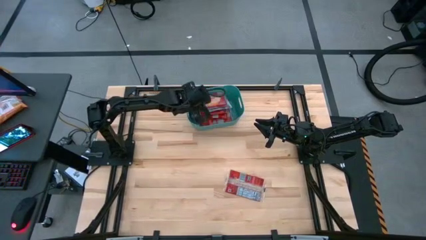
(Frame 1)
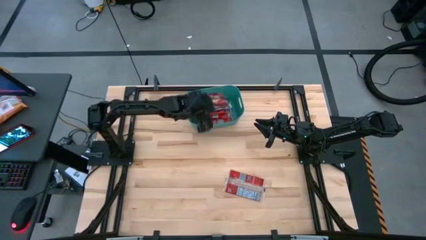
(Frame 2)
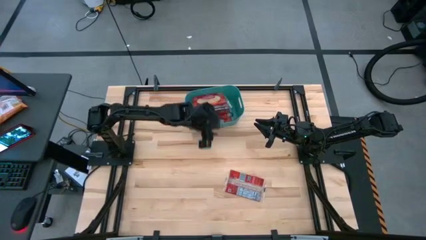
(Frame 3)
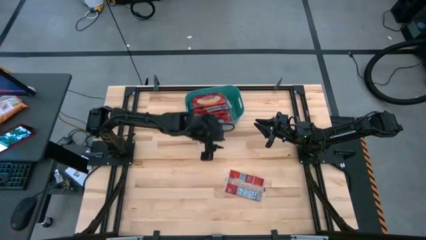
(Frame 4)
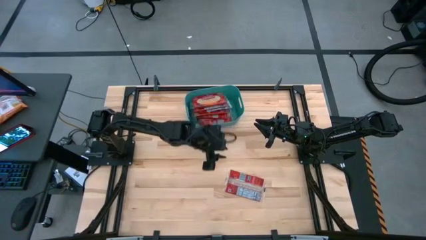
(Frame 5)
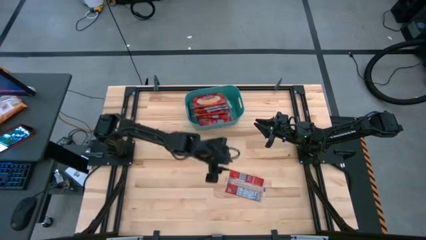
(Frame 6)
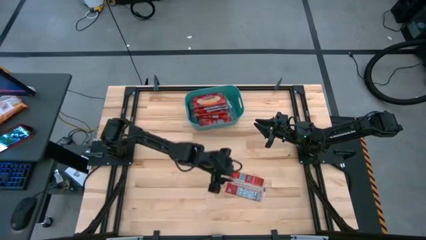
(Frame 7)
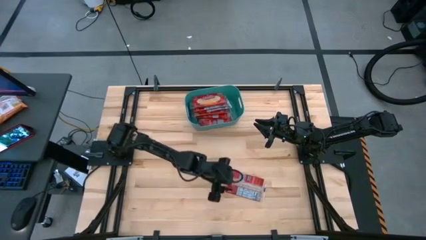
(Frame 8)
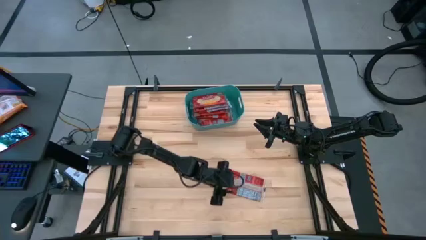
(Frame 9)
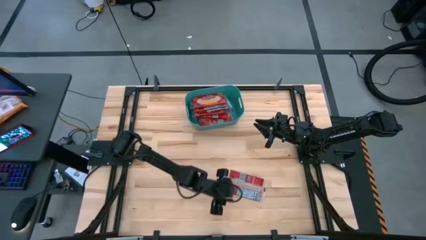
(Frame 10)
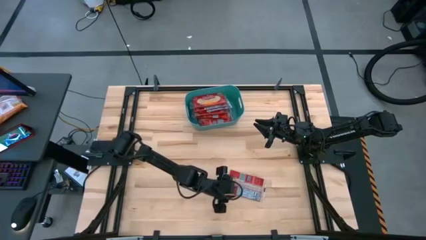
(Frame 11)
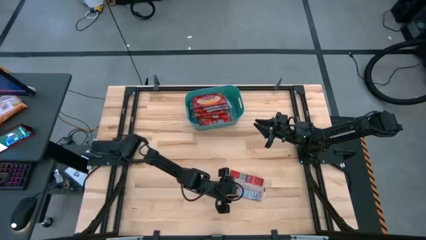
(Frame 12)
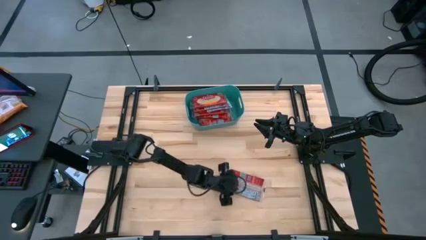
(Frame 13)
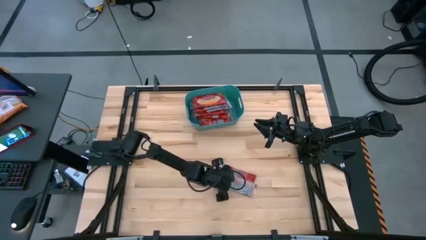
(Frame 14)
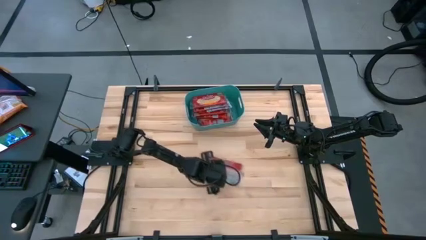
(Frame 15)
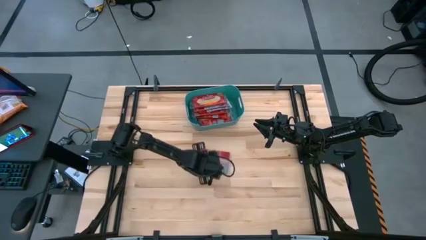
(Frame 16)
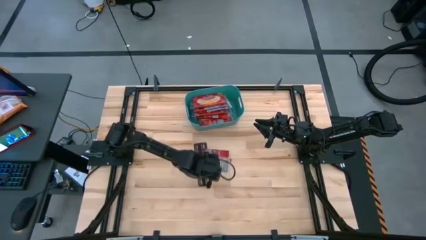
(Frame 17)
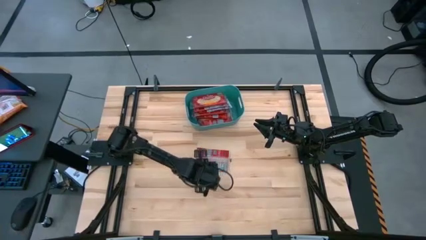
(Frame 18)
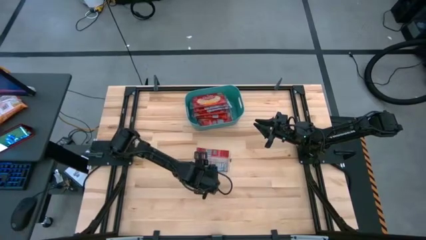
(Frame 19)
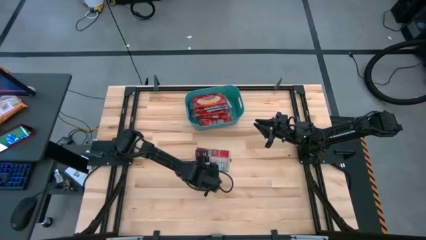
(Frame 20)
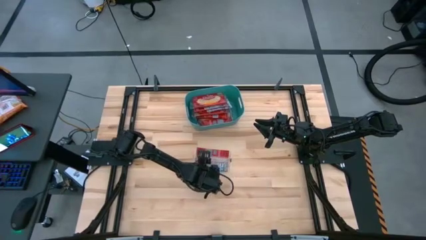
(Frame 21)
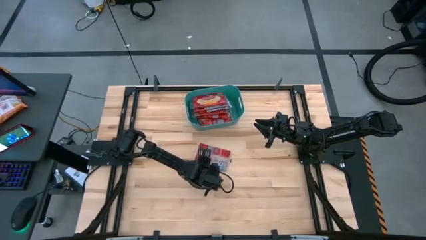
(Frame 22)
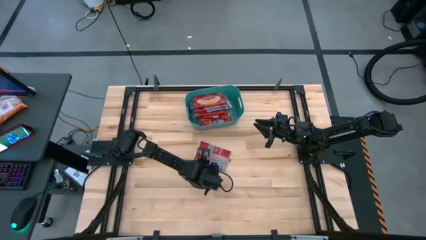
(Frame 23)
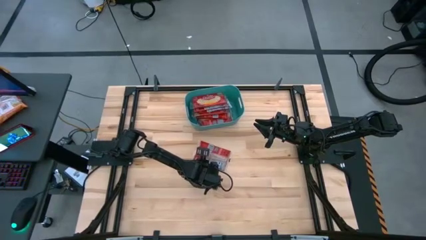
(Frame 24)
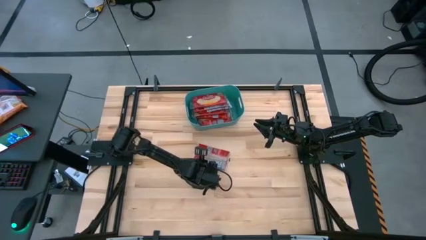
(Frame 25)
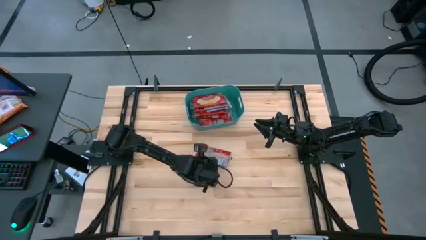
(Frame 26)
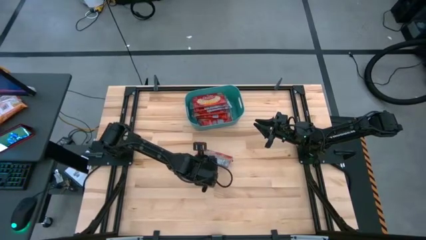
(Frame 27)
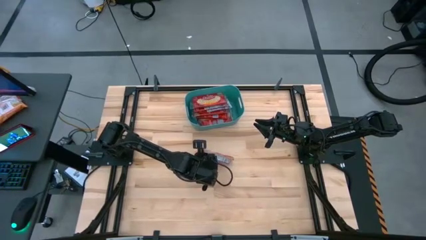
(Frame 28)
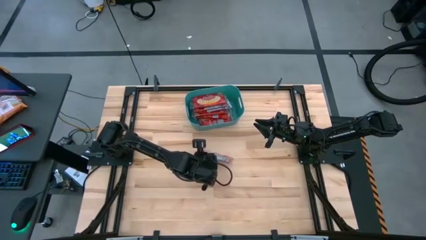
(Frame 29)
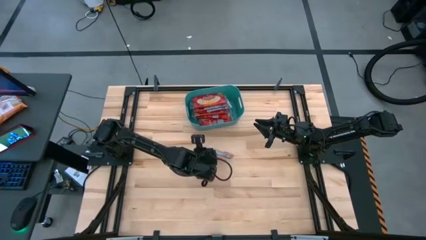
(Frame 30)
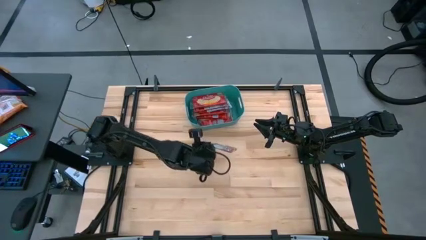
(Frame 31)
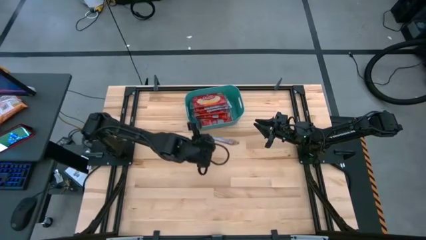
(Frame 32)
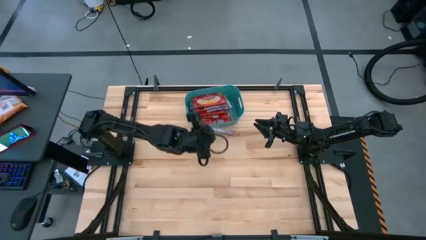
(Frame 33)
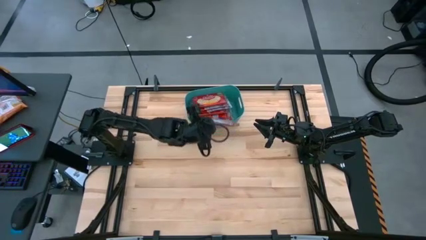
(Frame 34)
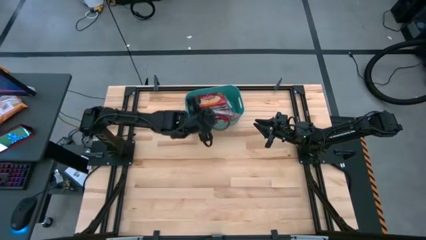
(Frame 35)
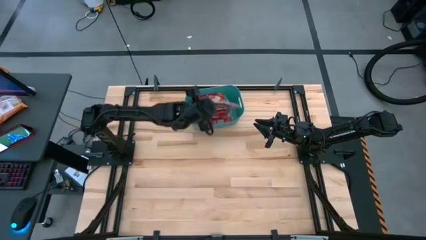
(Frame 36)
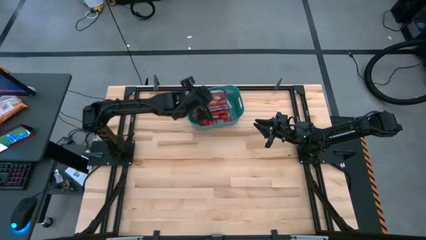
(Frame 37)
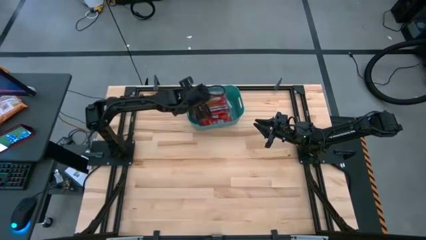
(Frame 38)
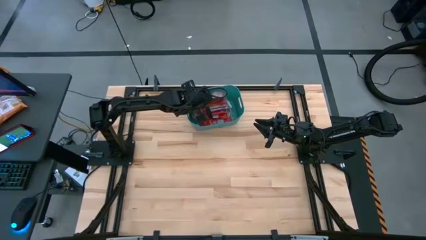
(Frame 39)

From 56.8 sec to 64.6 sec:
Task: Sort popcorn bags into baskets
Put the red popcorn bag into the blue bin

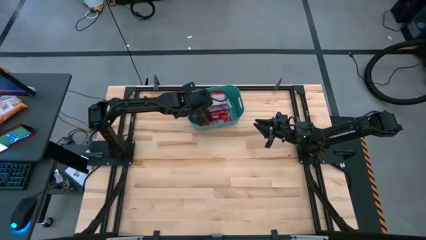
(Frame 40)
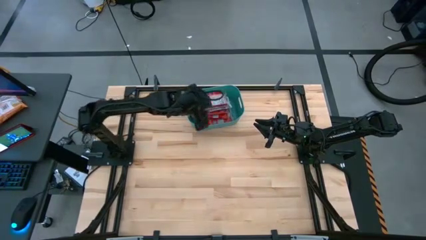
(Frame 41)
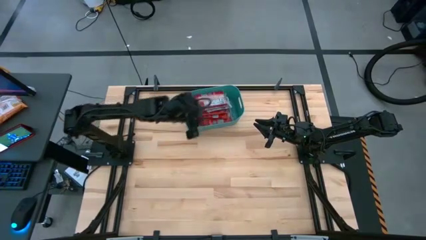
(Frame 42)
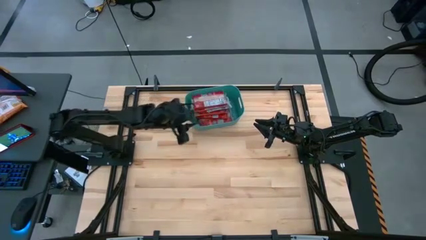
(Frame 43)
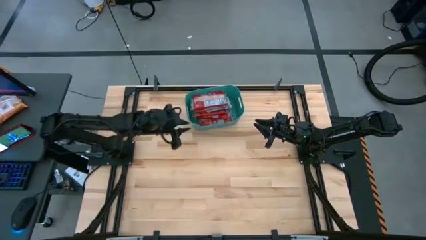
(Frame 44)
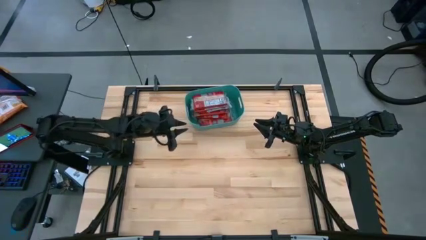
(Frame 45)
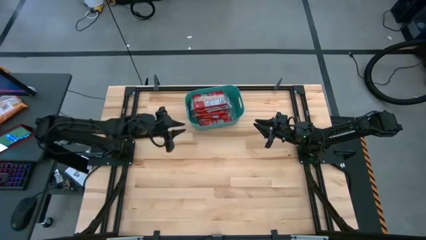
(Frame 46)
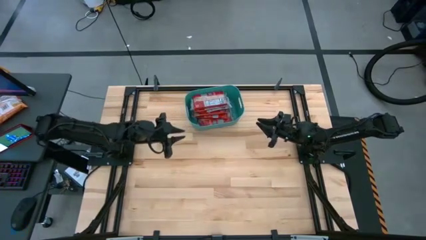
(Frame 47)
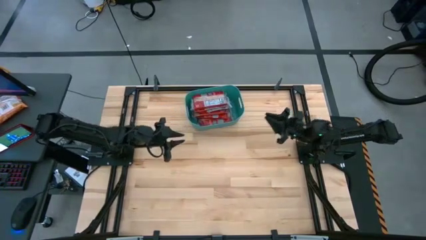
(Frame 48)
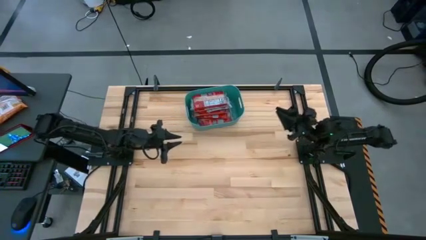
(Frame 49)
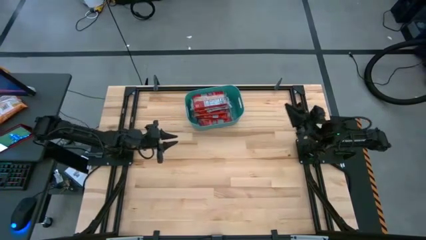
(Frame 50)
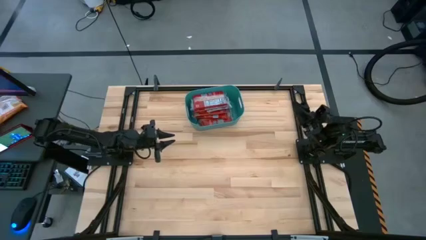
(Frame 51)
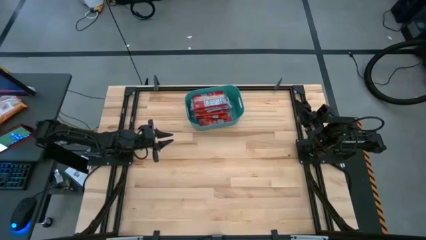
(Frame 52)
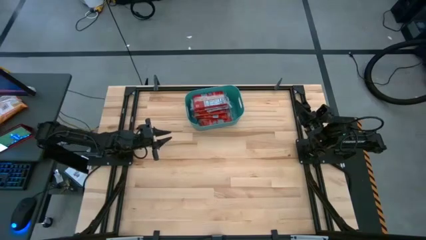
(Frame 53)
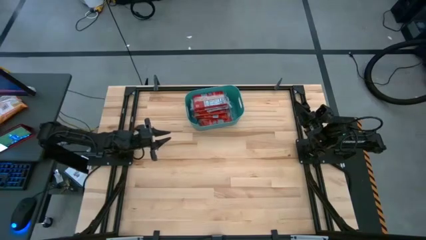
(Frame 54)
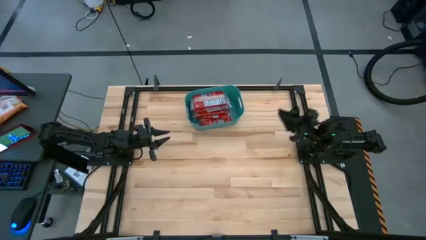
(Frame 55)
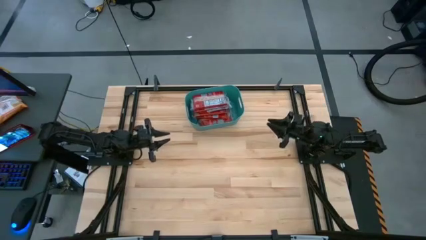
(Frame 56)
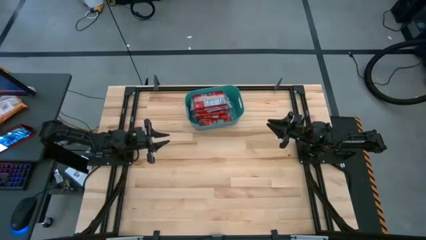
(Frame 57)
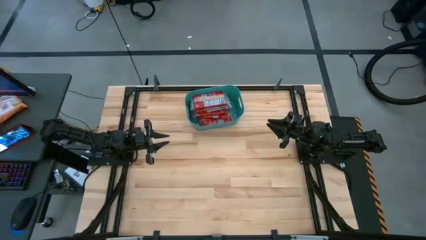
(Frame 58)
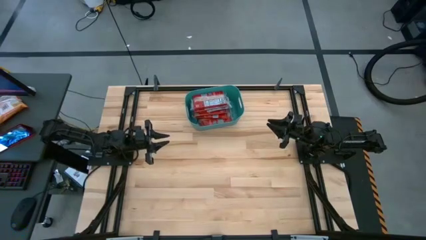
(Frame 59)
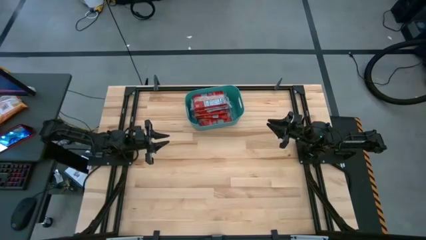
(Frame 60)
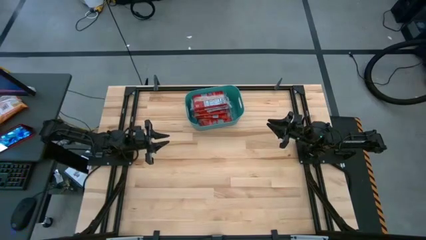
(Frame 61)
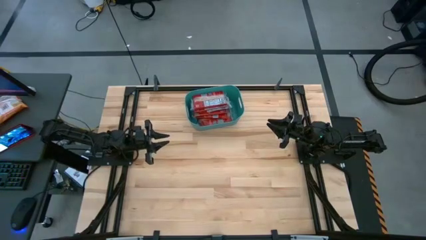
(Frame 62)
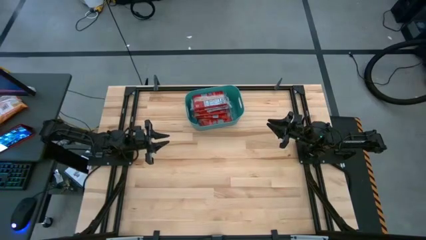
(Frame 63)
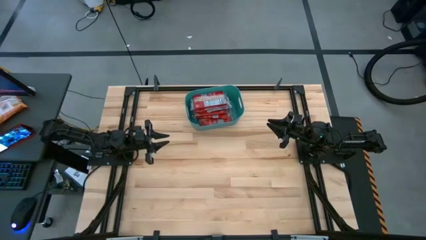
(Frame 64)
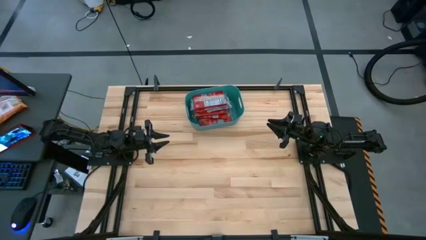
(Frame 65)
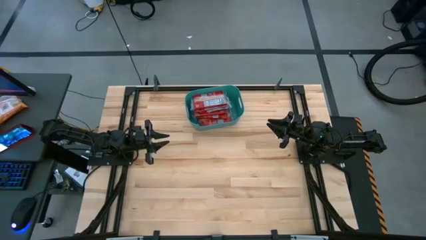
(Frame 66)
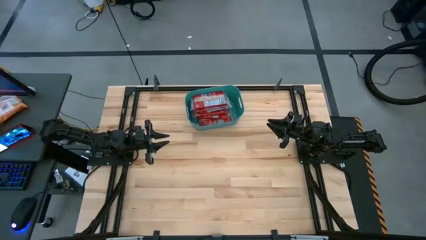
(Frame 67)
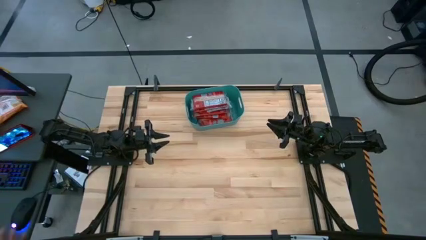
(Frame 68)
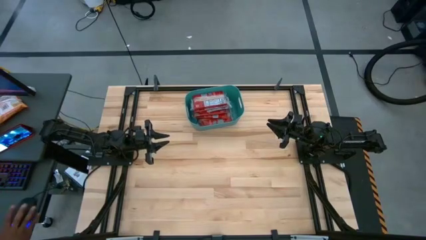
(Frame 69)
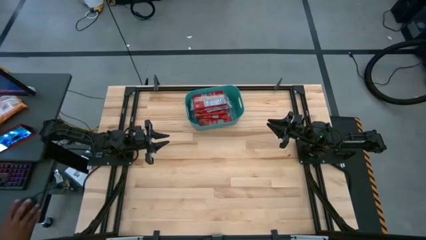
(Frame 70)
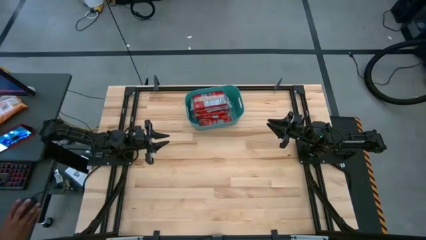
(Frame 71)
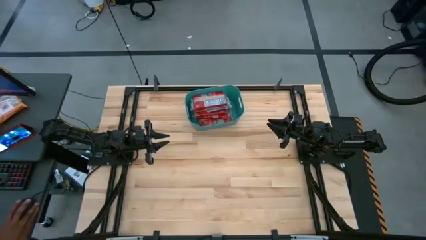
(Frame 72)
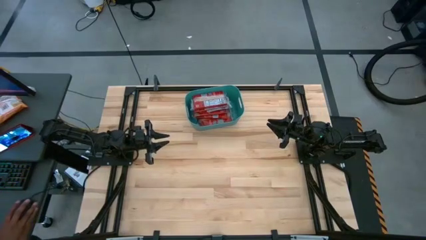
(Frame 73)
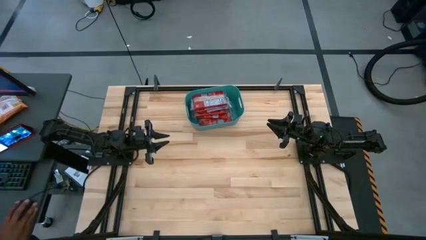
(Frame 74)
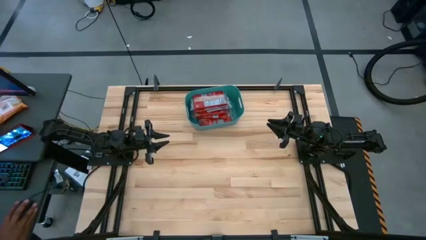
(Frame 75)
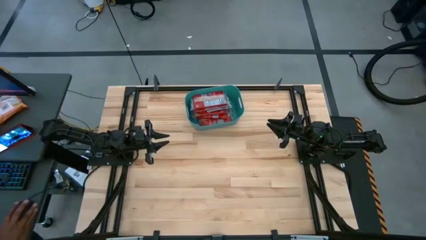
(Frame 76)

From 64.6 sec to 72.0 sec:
Return to home position

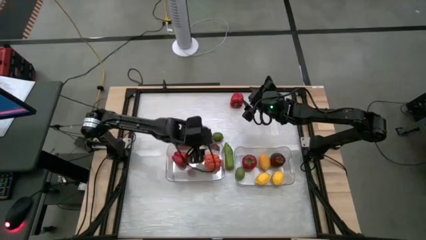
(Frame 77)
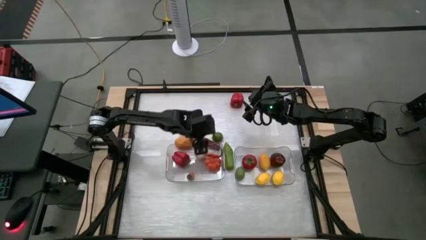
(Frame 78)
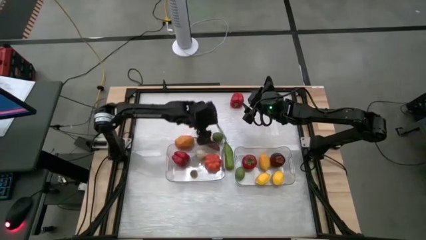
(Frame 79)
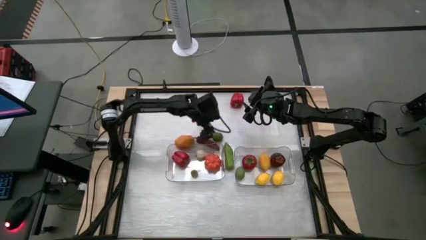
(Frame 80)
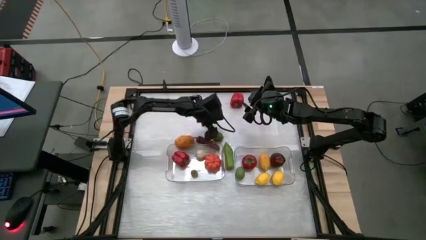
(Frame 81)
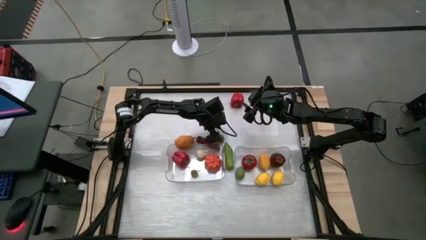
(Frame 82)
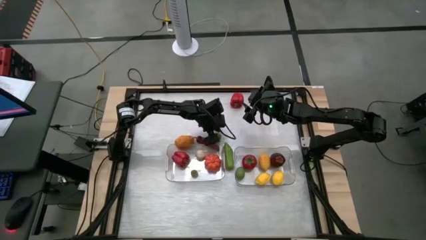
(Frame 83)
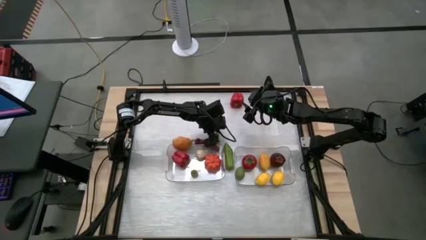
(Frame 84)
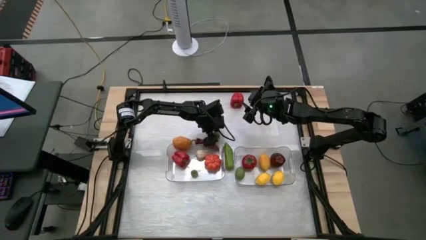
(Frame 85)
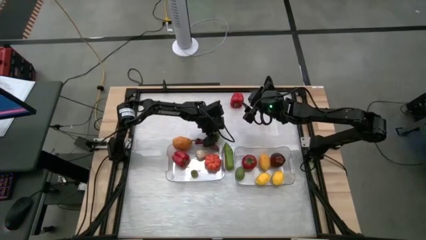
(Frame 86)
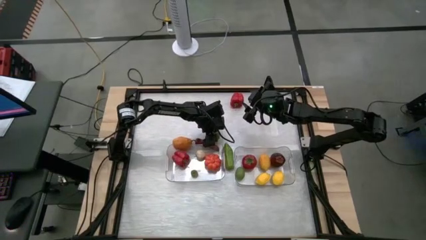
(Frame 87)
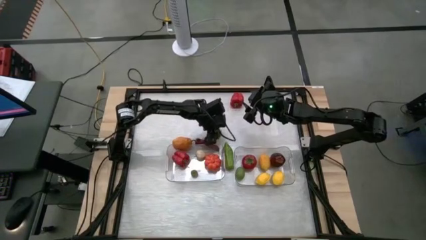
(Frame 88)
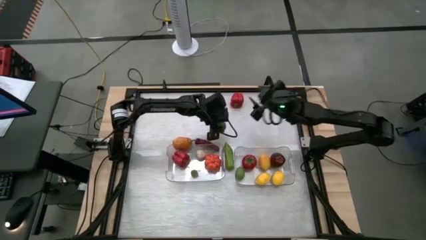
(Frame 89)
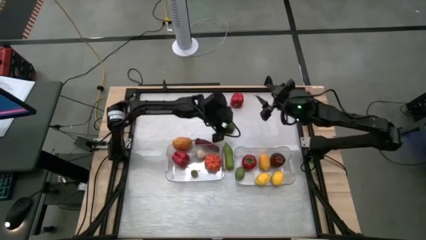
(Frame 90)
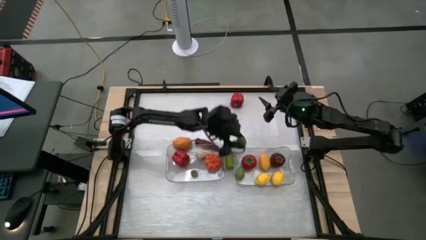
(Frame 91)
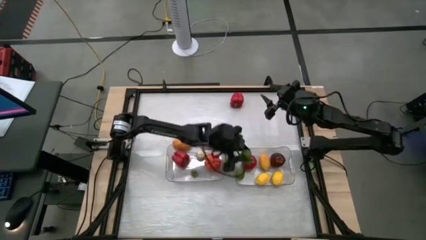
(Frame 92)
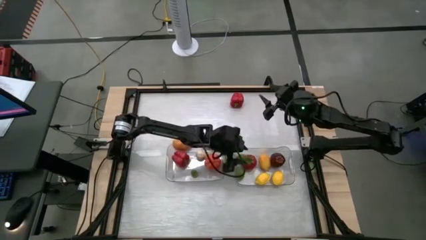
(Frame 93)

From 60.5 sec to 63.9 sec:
Task: Sort produce into baskets
Put the lime into the right transparent bin
